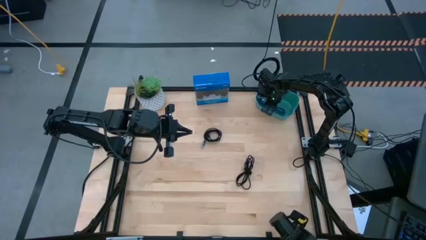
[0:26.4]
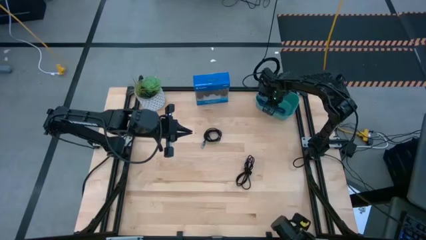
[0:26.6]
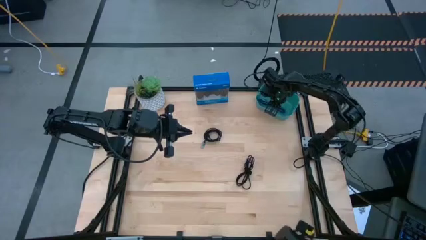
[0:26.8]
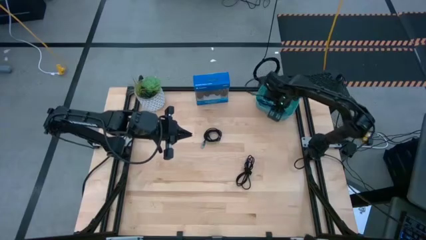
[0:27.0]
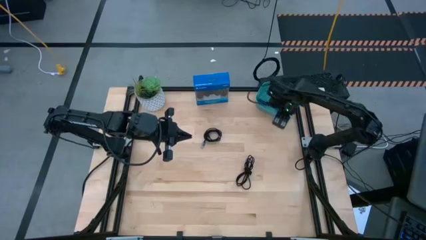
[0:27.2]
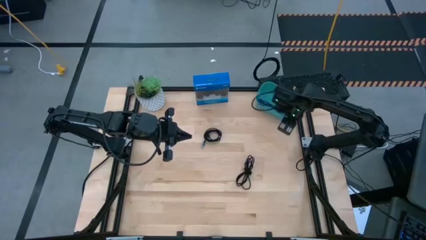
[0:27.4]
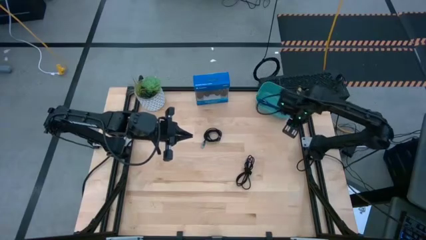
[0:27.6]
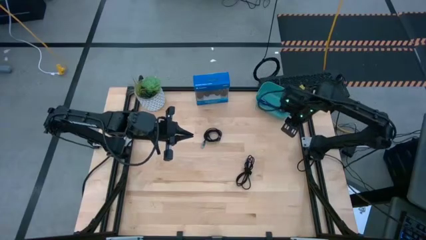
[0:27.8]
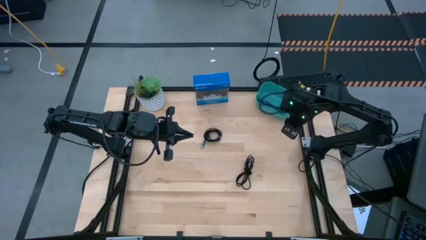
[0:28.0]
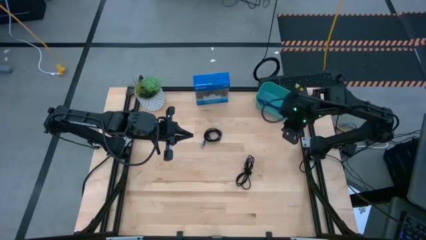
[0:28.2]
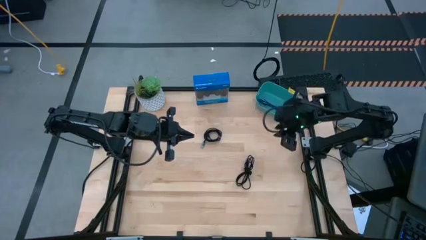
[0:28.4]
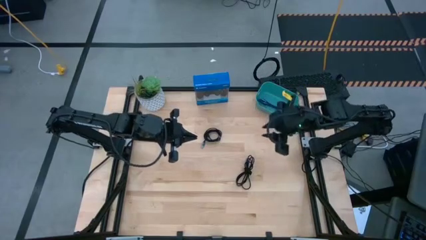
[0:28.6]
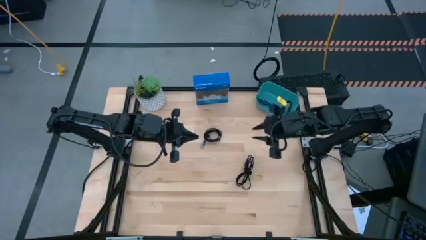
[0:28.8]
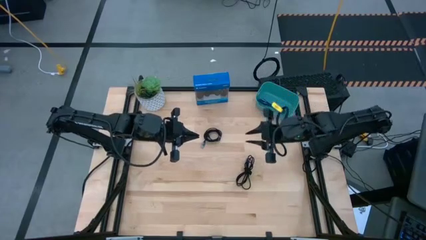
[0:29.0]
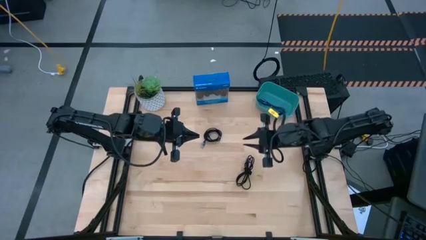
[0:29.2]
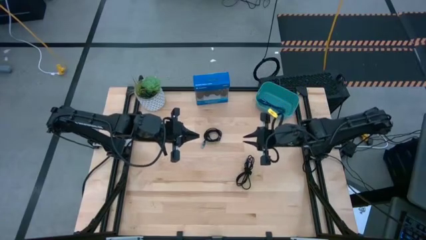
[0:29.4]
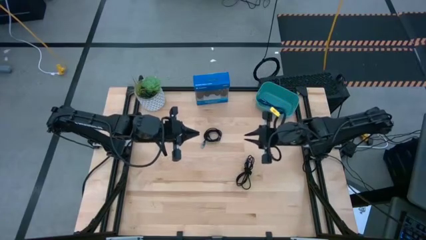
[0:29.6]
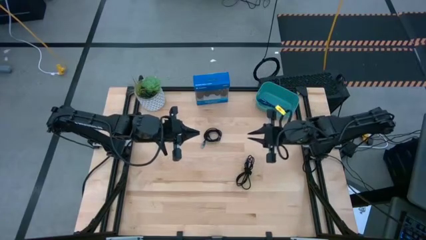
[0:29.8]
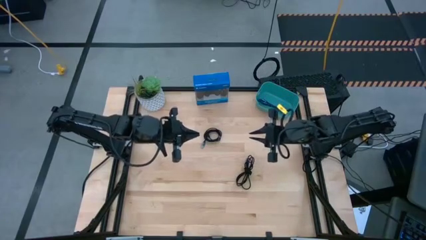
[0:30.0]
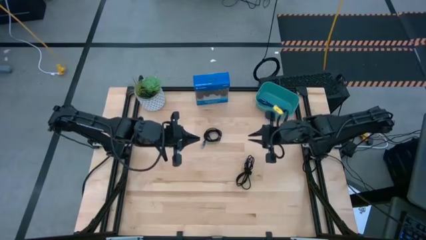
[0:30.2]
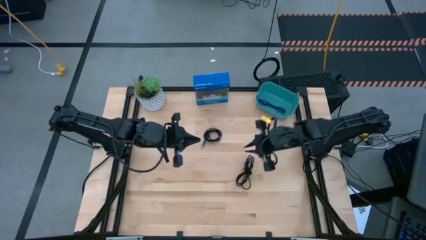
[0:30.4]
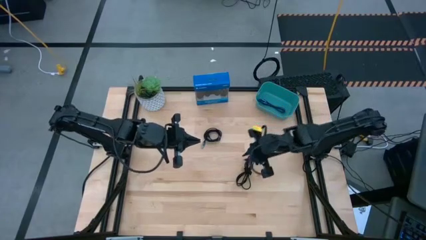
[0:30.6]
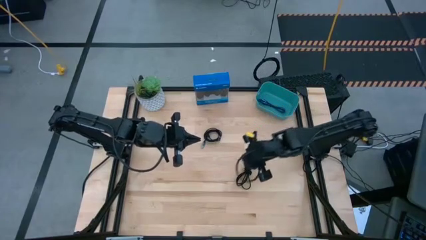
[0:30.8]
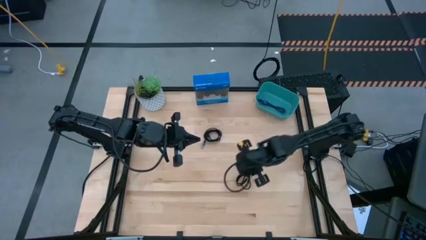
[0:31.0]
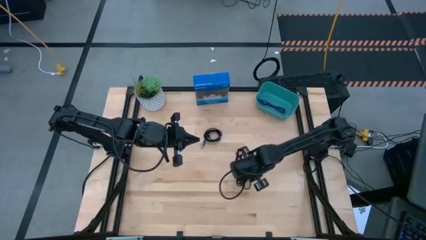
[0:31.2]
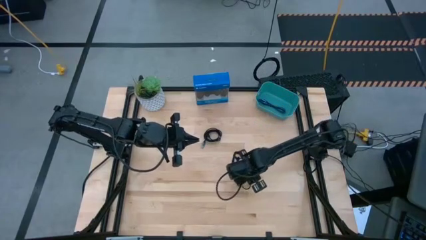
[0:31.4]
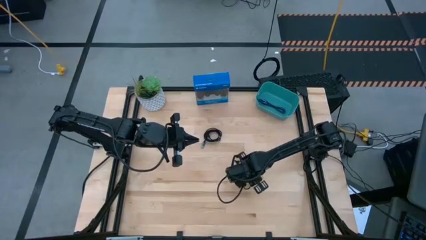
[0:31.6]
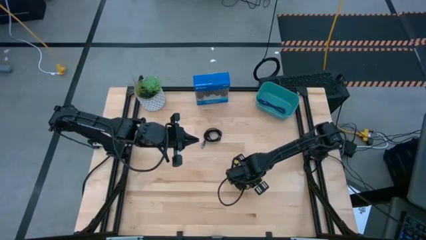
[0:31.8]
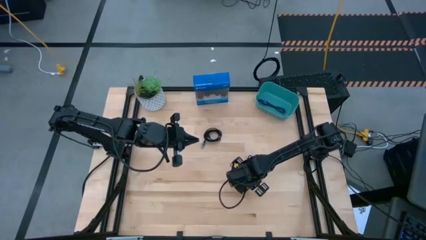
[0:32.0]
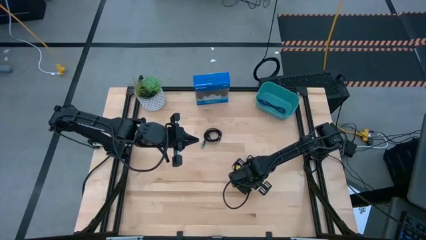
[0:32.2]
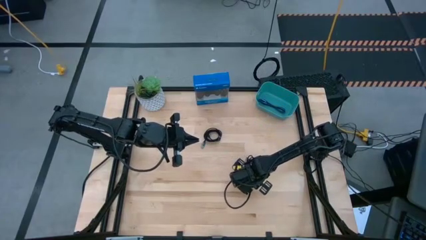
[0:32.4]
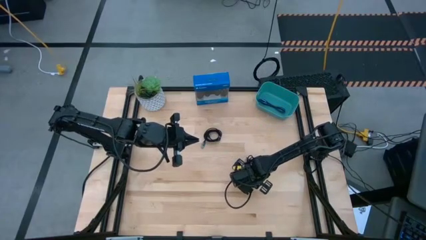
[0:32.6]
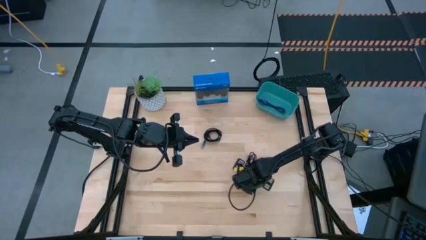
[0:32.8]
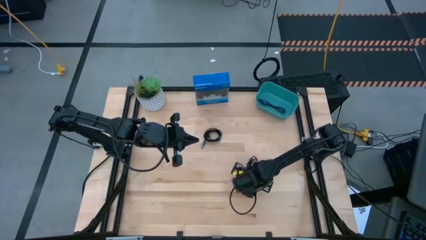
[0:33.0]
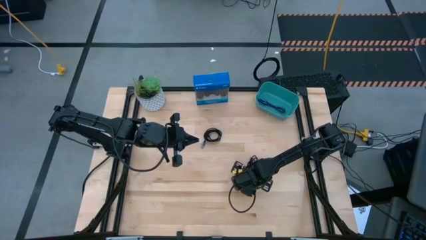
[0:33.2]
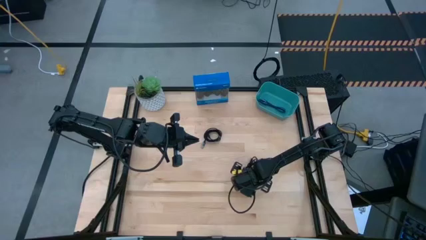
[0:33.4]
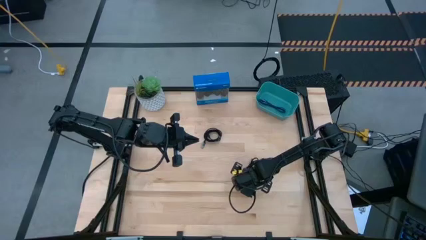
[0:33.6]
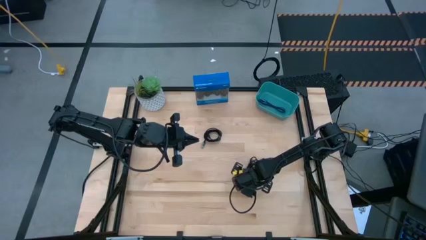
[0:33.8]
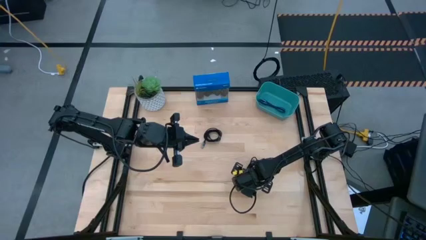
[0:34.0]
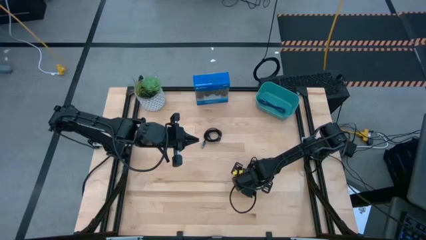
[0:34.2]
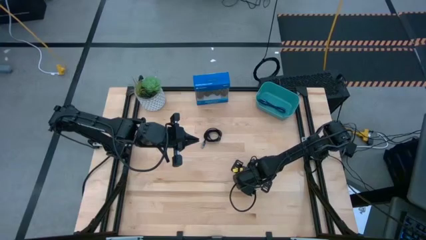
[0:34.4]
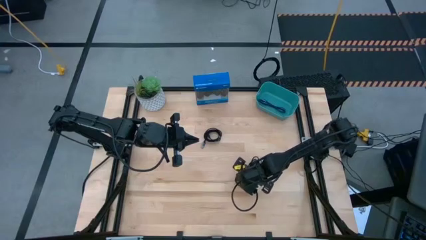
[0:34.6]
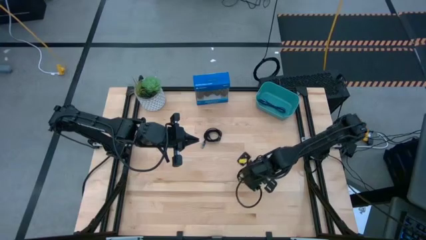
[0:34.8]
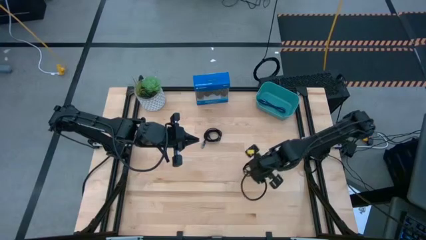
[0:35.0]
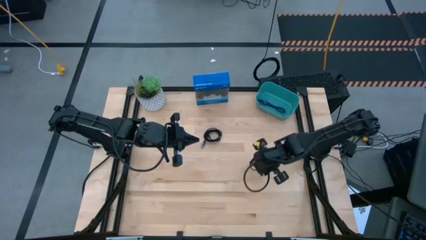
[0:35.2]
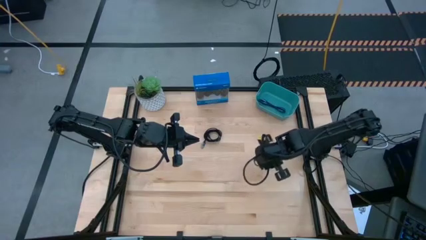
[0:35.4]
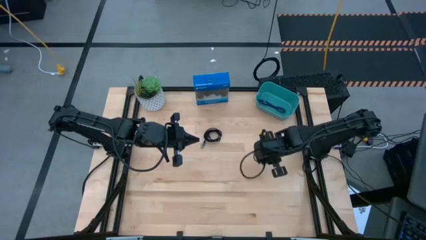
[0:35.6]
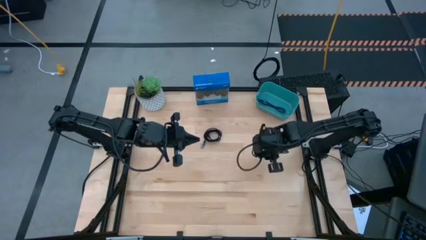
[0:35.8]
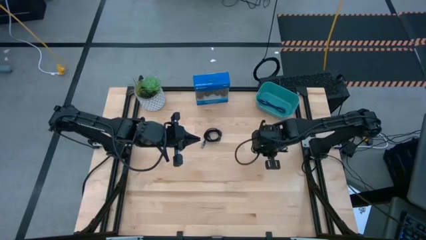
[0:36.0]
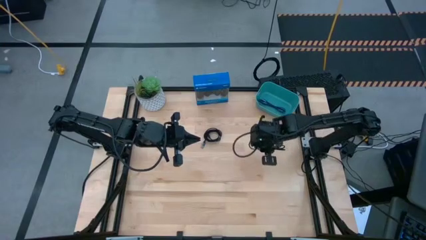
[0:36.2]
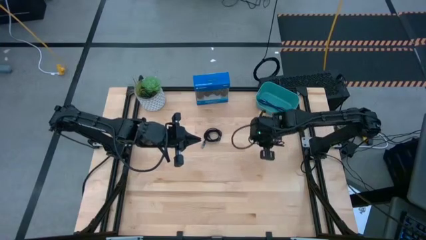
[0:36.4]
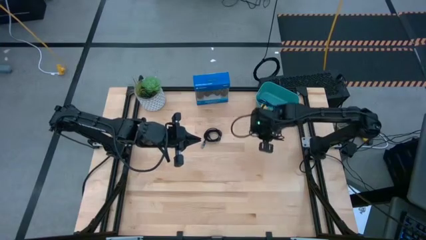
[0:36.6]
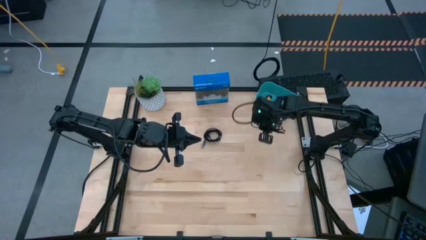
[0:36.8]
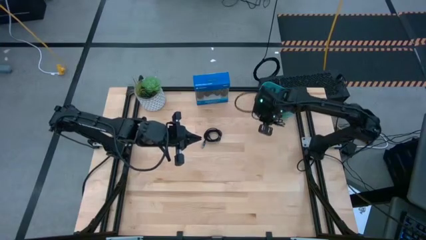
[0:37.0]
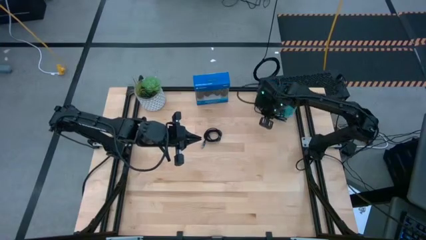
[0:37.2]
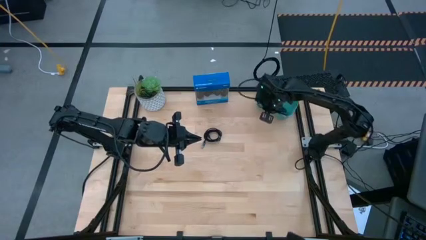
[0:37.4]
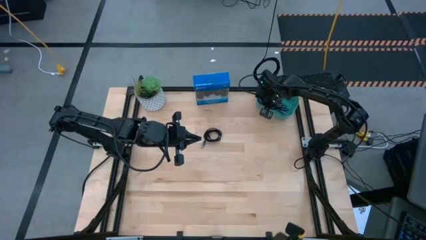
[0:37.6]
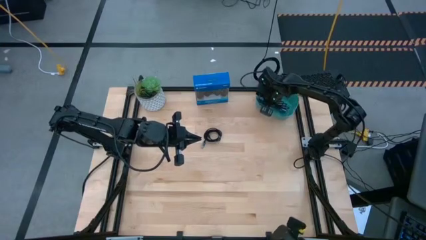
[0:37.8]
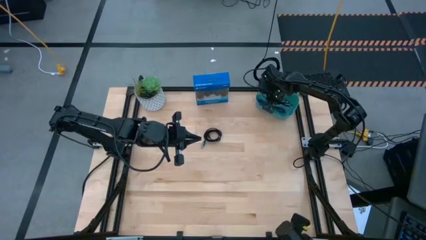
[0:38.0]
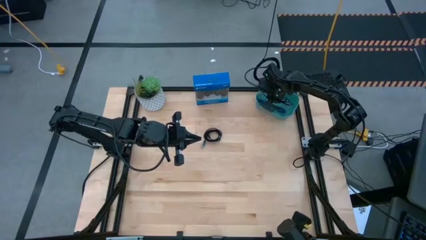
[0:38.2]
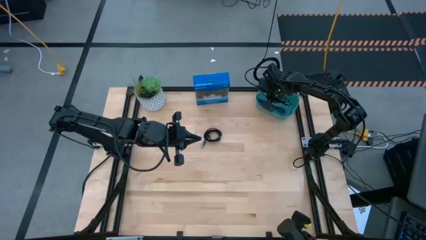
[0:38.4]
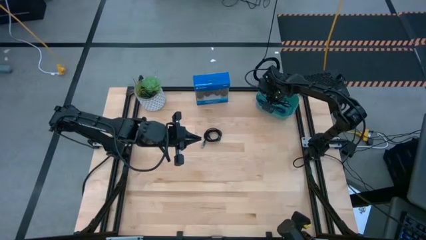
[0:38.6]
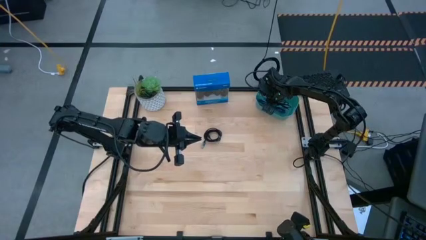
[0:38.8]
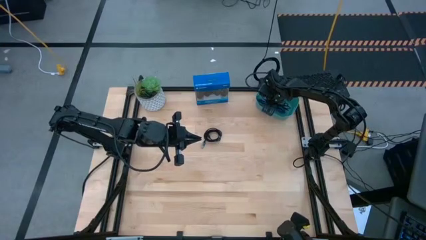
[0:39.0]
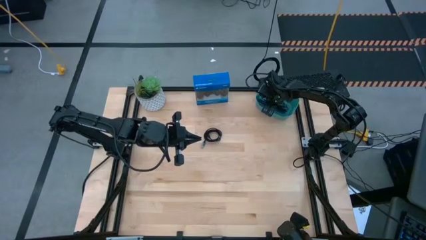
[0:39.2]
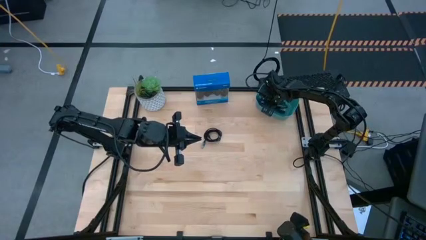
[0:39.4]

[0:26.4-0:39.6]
Task: Pick and place USB-C Cables
Put the bottom black charger cable into the green bin

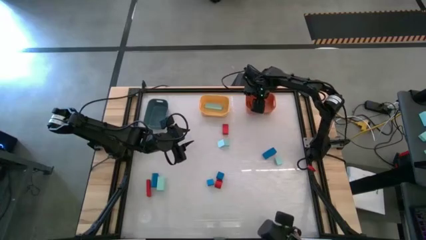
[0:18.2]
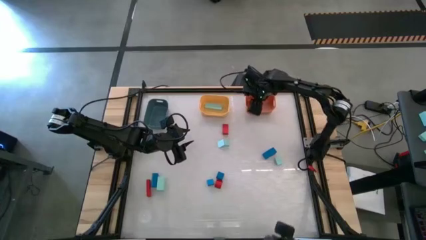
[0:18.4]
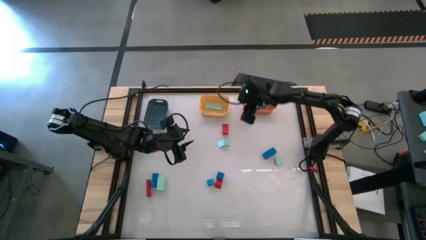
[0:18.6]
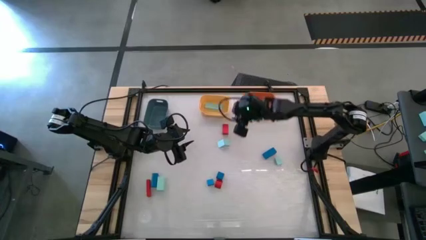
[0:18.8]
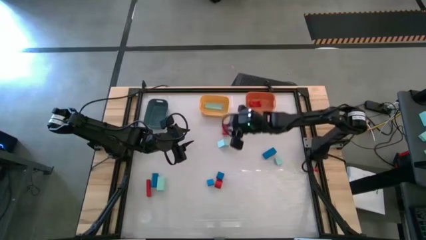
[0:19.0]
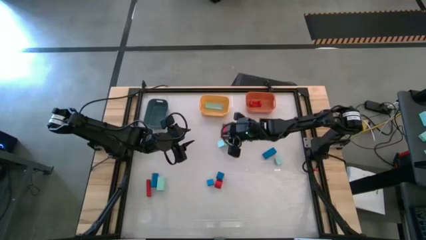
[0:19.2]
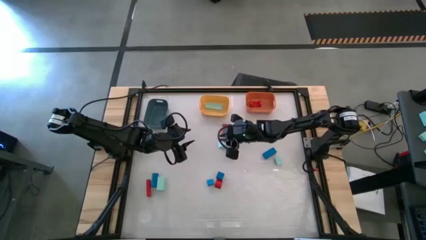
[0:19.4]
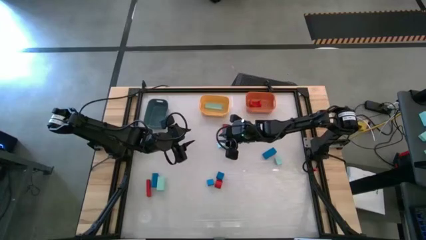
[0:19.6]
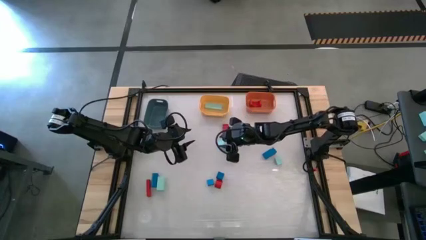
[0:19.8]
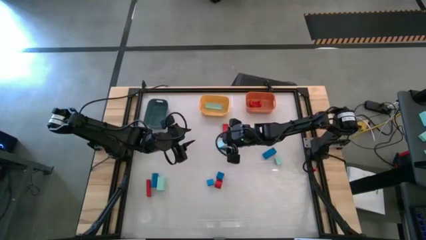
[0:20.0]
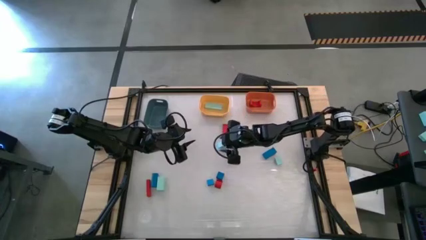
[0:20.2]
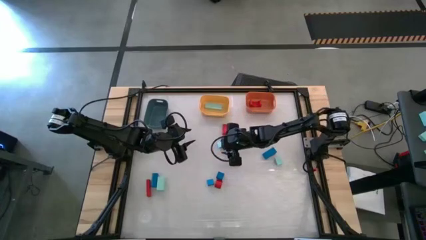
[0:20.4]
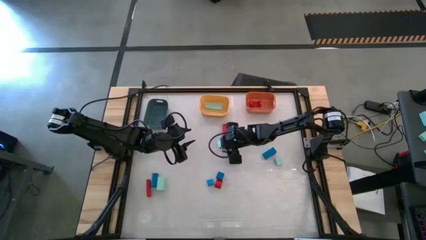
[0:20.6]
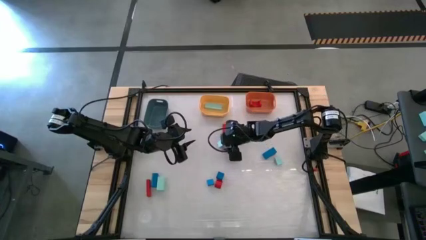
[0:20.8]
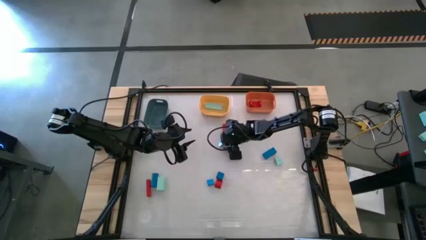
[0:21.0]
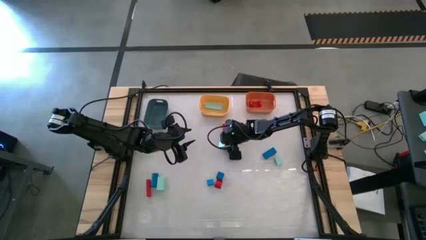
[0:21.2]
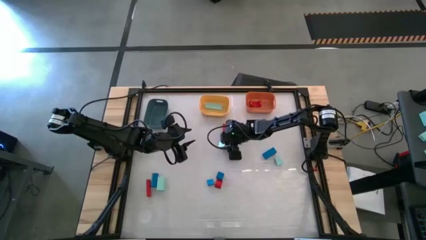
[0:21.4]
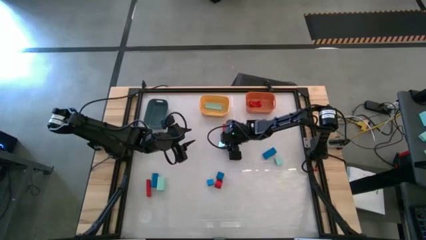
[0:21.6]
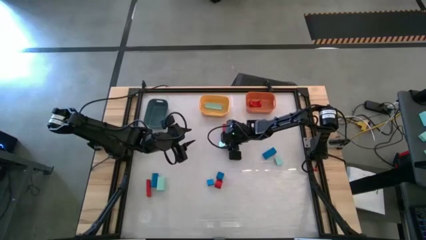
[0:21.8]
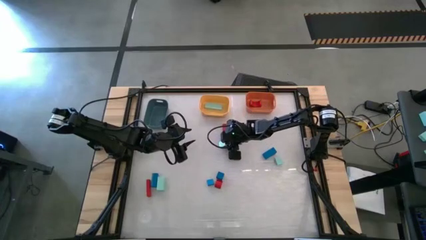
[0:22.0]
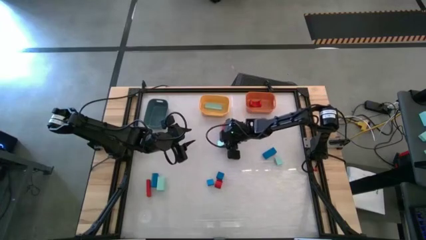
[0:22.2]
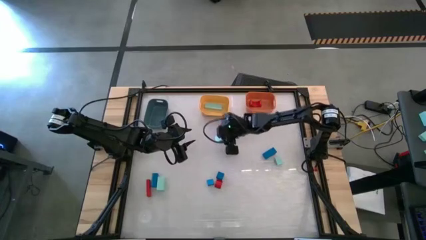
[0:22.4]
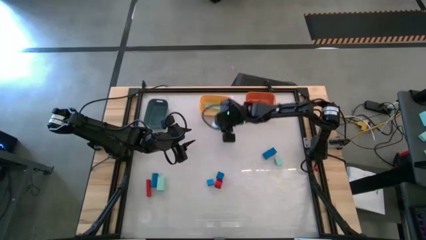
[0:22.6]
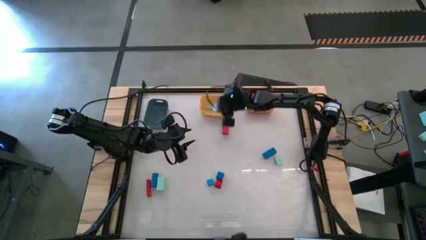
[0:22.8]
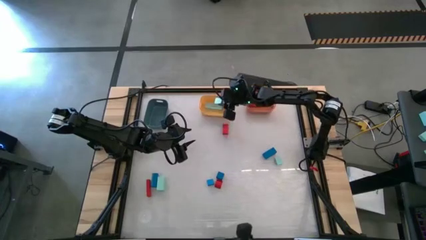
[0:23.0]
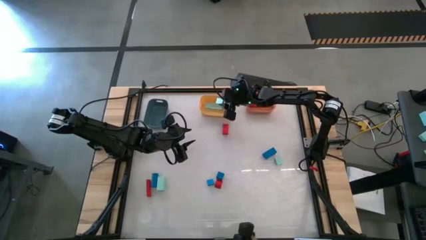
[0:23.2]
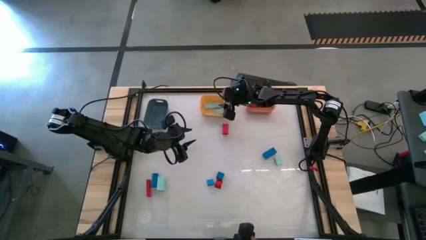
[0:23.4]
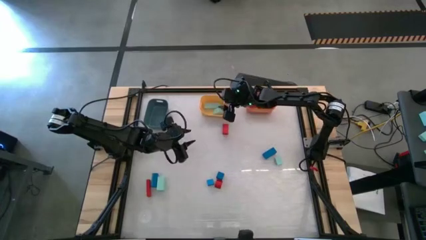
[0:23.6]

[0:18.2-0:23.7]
Task: Sort & place blocks by color
Put the light blue triangular block into the yellow bin
